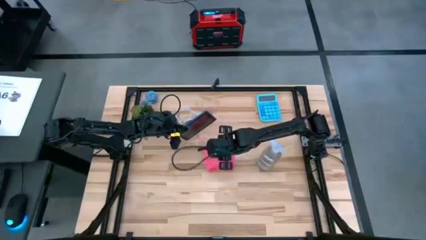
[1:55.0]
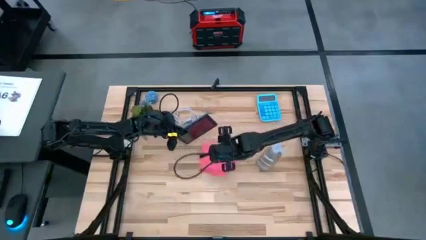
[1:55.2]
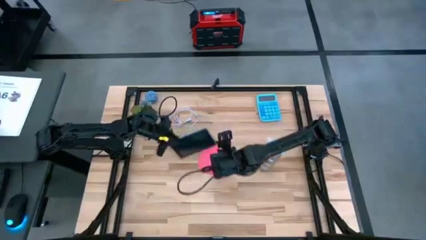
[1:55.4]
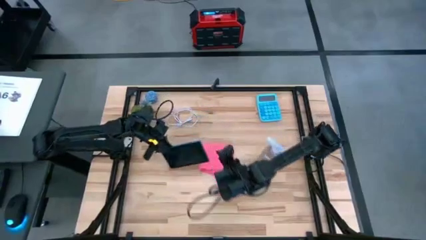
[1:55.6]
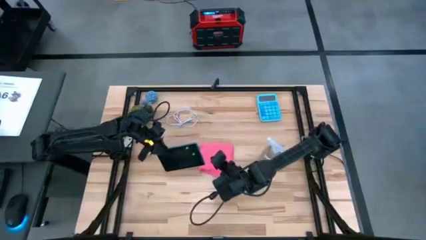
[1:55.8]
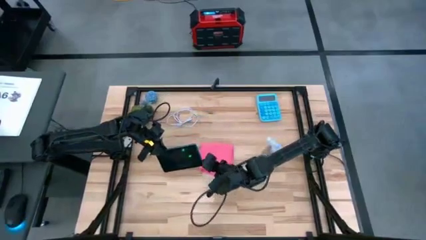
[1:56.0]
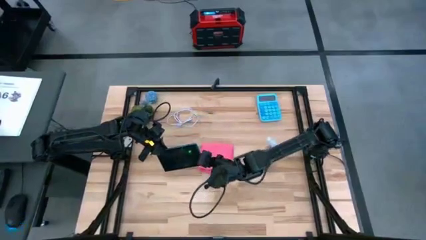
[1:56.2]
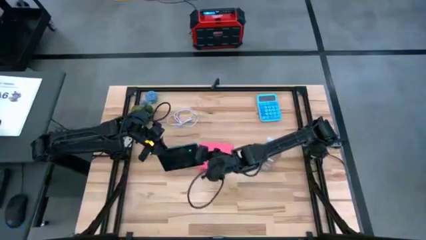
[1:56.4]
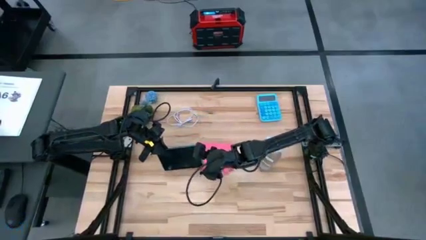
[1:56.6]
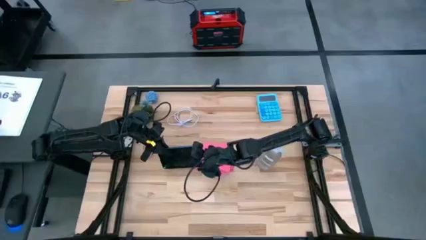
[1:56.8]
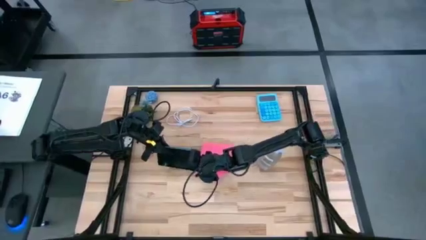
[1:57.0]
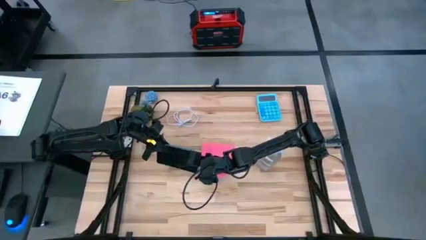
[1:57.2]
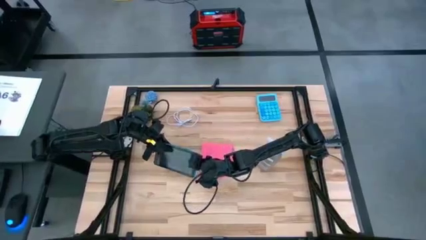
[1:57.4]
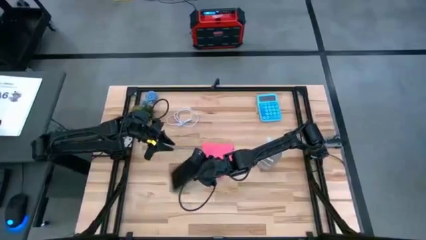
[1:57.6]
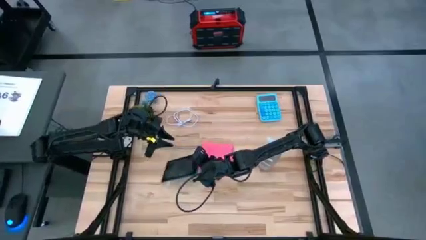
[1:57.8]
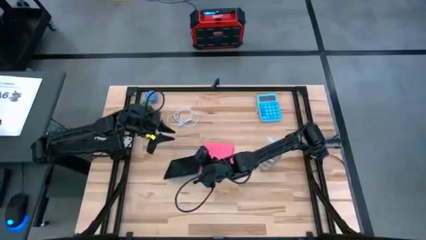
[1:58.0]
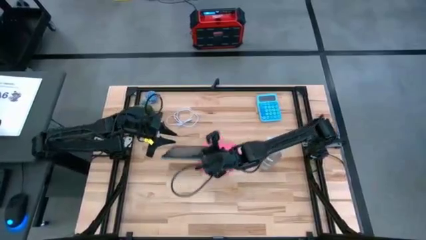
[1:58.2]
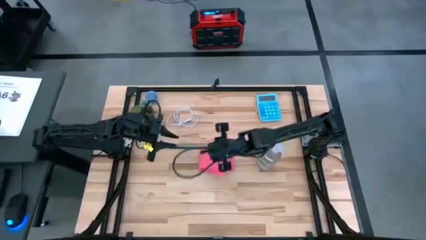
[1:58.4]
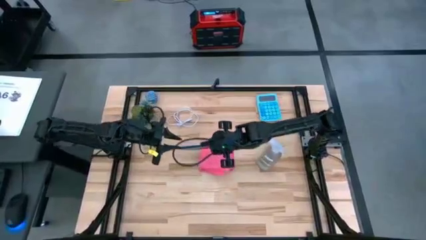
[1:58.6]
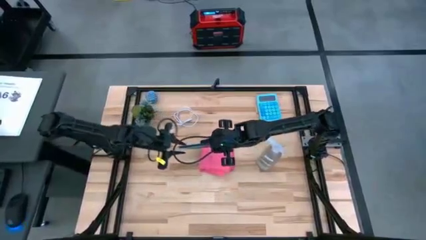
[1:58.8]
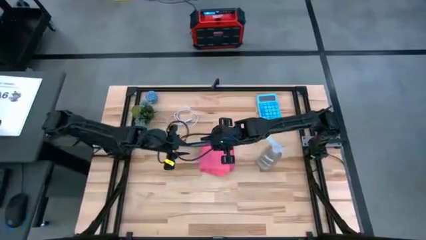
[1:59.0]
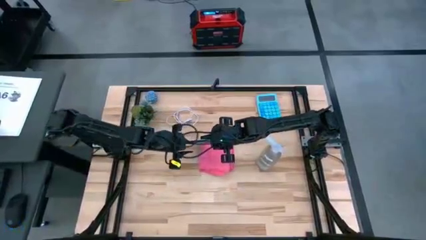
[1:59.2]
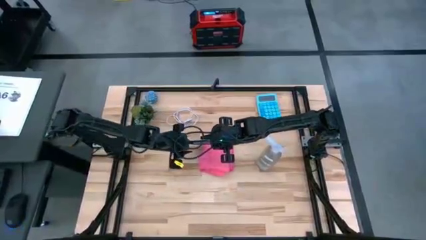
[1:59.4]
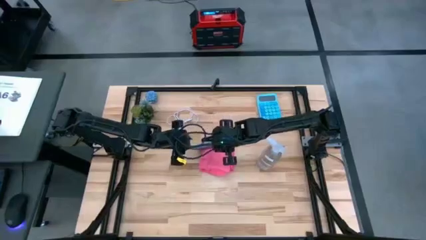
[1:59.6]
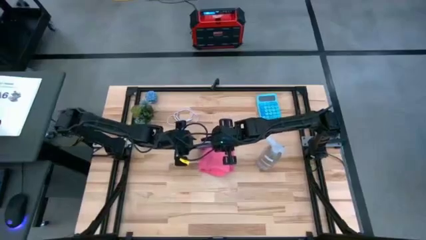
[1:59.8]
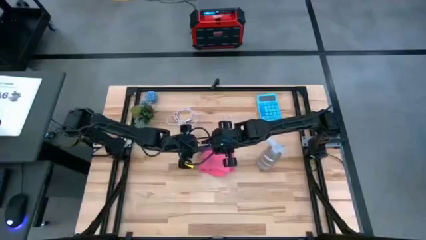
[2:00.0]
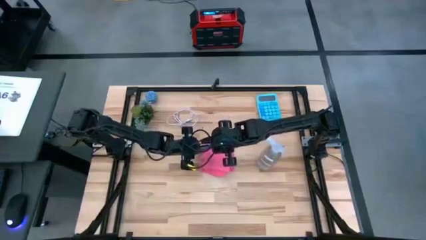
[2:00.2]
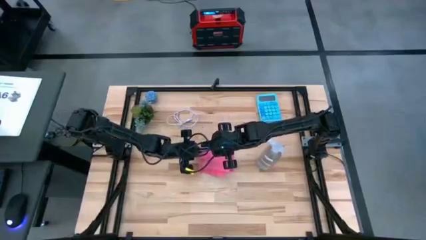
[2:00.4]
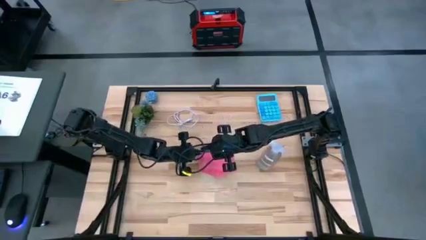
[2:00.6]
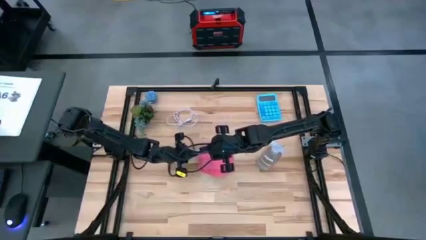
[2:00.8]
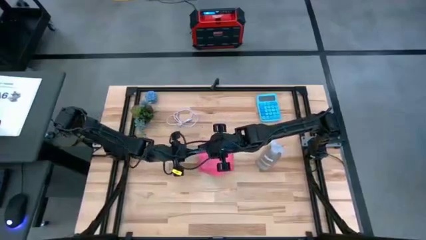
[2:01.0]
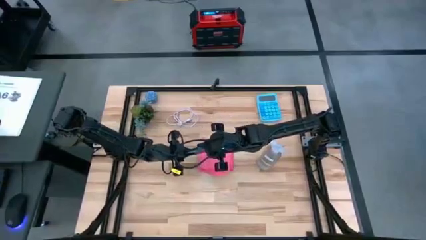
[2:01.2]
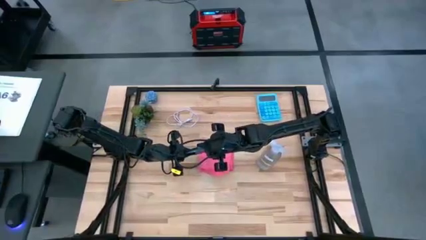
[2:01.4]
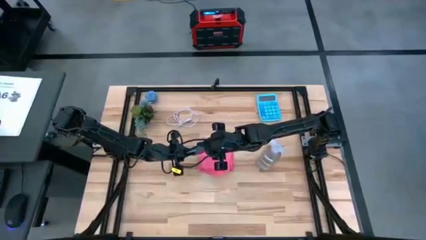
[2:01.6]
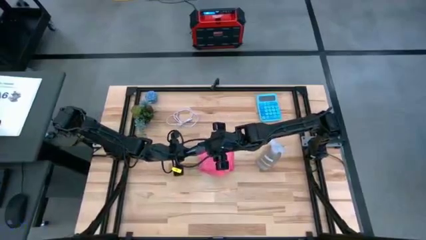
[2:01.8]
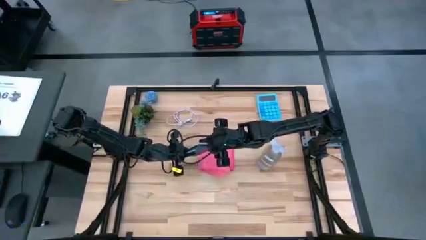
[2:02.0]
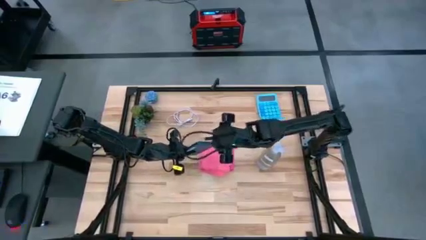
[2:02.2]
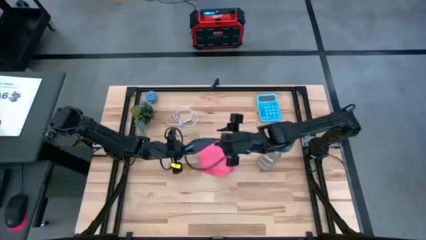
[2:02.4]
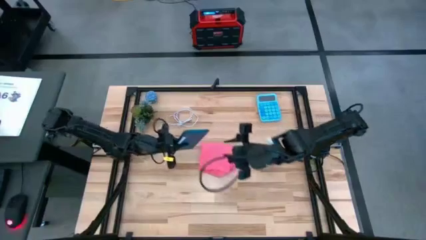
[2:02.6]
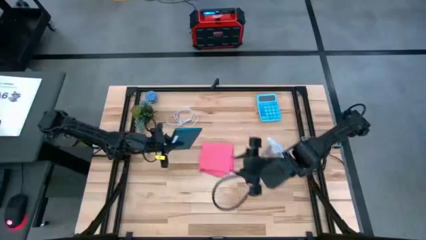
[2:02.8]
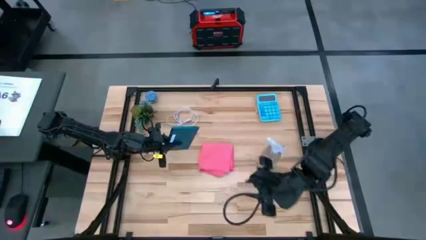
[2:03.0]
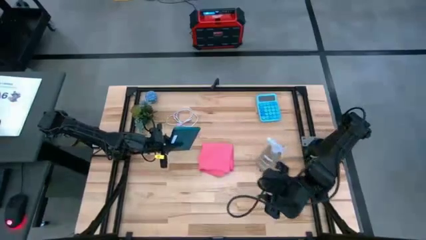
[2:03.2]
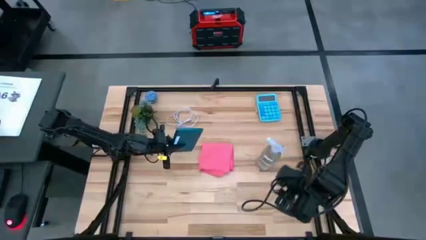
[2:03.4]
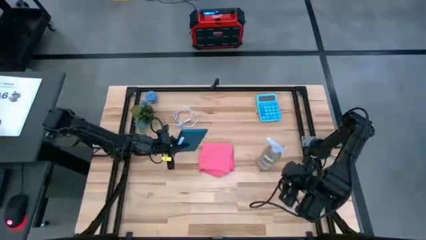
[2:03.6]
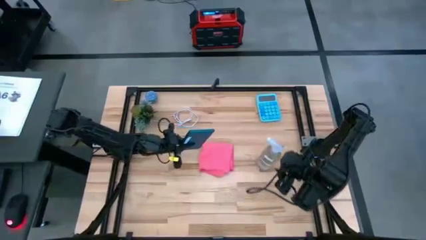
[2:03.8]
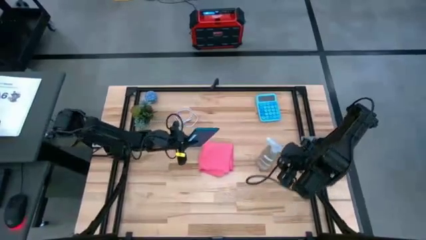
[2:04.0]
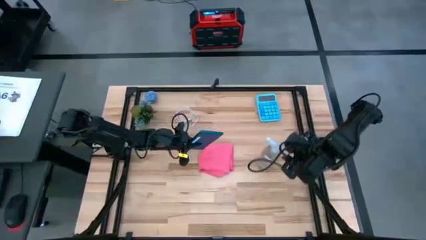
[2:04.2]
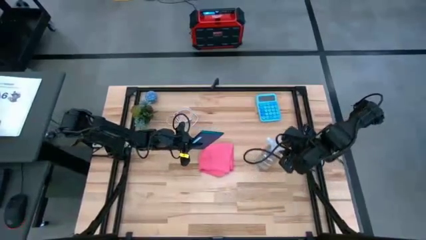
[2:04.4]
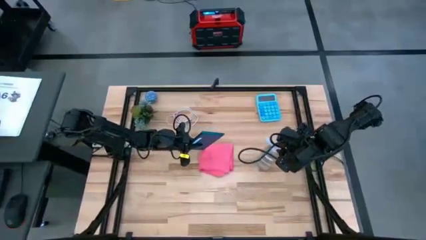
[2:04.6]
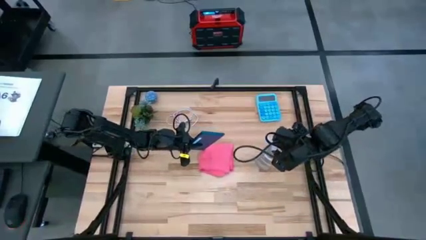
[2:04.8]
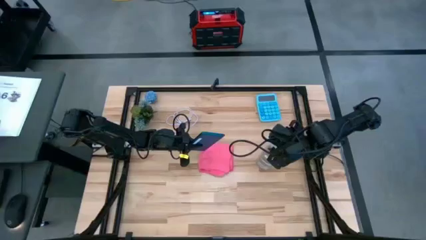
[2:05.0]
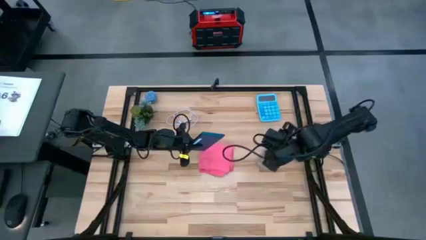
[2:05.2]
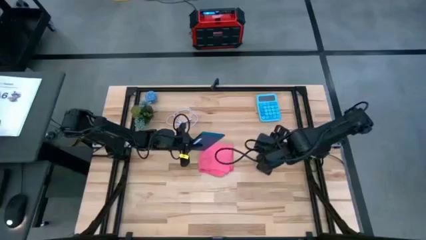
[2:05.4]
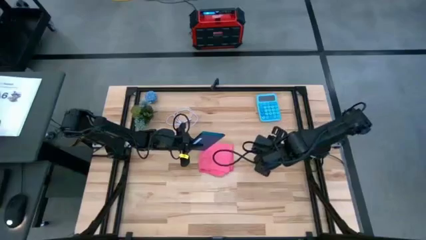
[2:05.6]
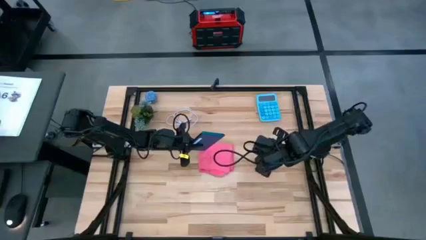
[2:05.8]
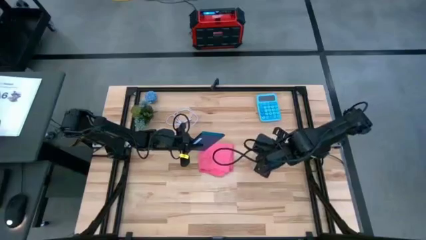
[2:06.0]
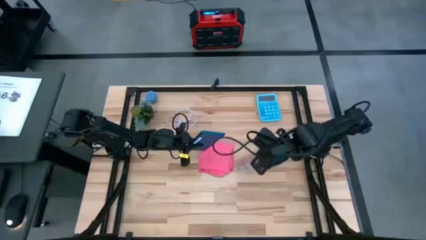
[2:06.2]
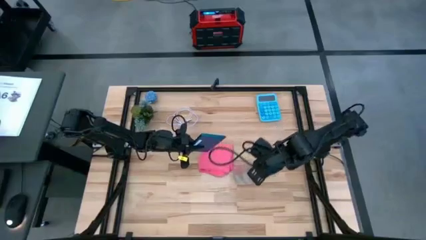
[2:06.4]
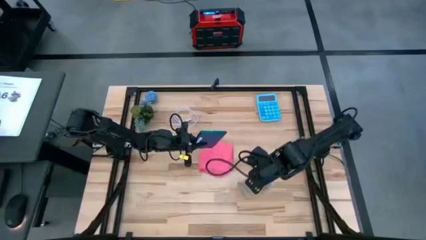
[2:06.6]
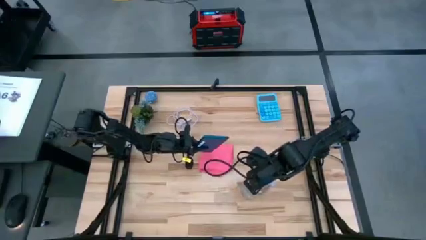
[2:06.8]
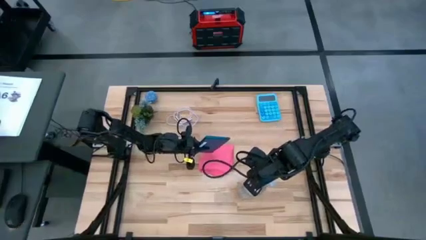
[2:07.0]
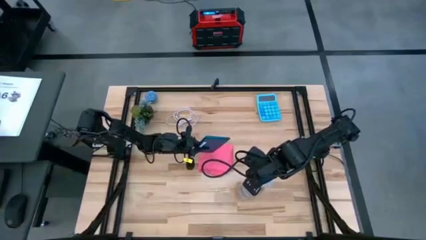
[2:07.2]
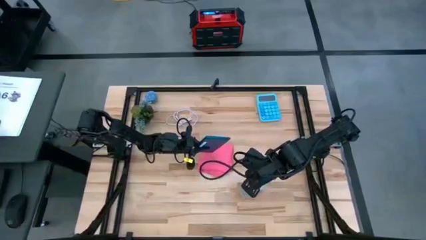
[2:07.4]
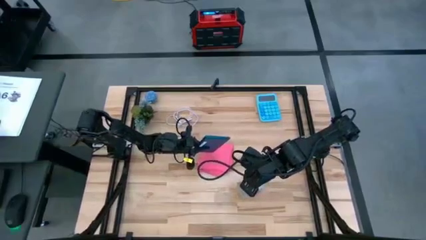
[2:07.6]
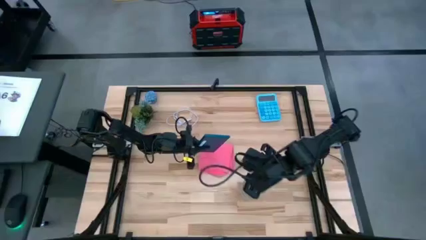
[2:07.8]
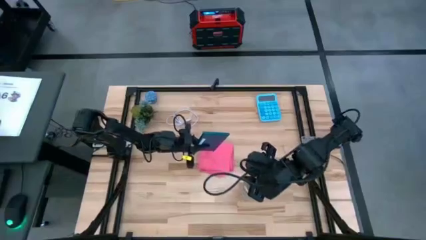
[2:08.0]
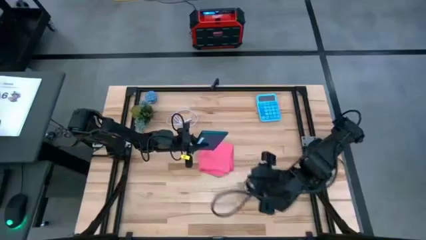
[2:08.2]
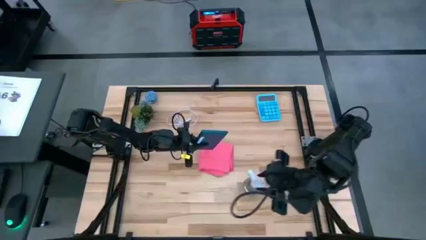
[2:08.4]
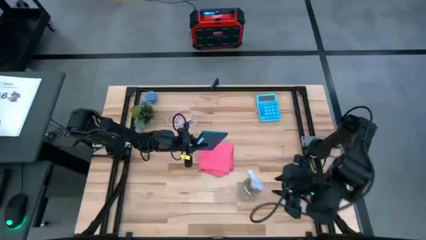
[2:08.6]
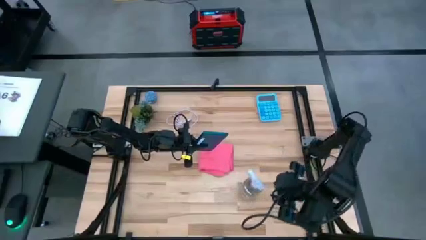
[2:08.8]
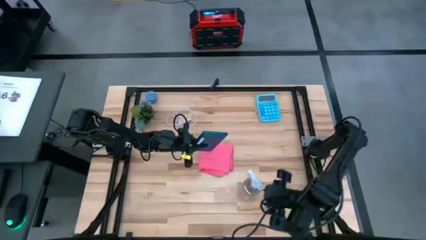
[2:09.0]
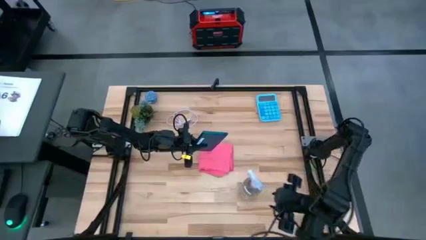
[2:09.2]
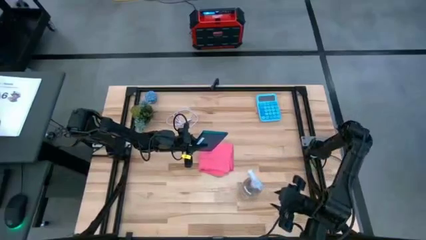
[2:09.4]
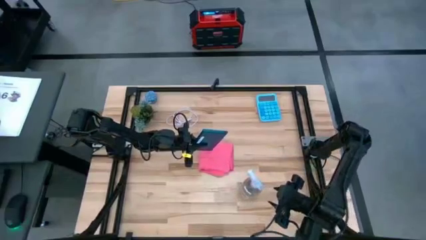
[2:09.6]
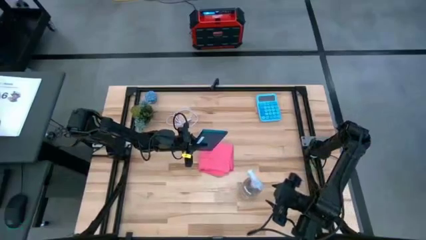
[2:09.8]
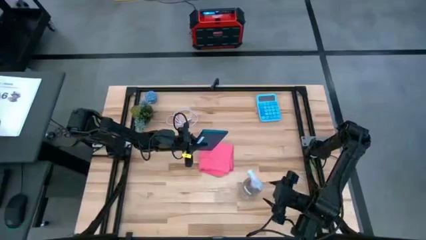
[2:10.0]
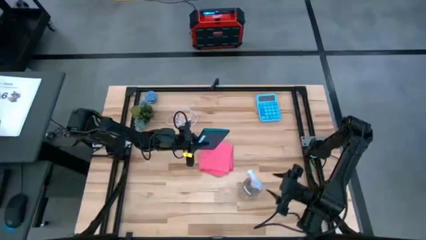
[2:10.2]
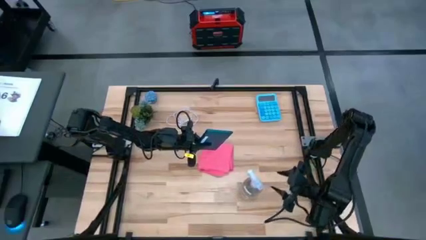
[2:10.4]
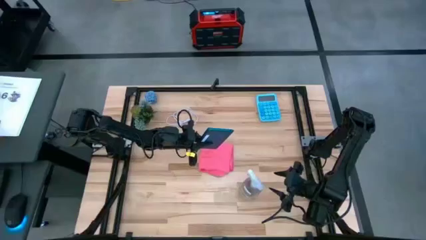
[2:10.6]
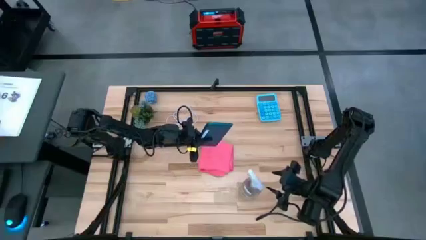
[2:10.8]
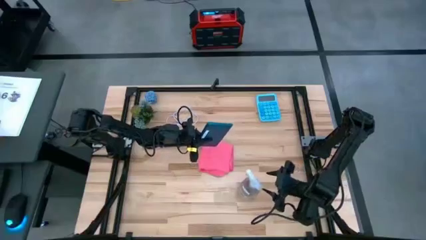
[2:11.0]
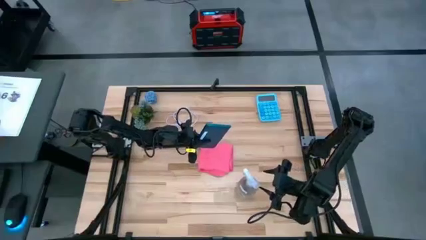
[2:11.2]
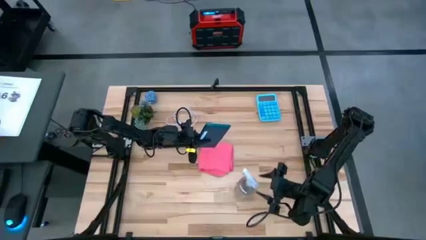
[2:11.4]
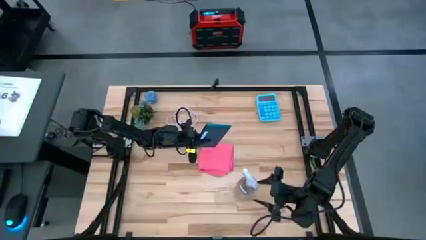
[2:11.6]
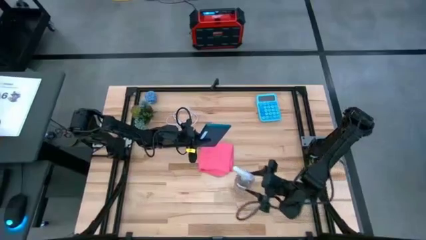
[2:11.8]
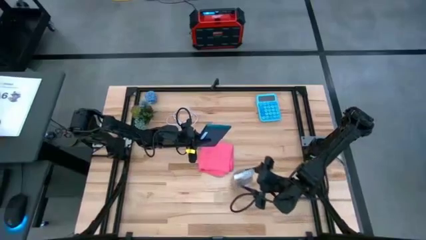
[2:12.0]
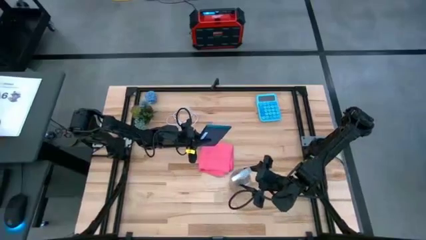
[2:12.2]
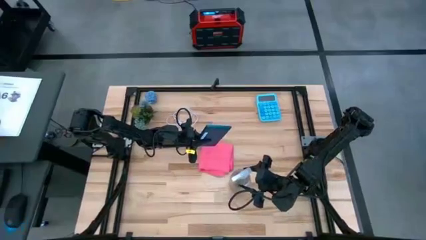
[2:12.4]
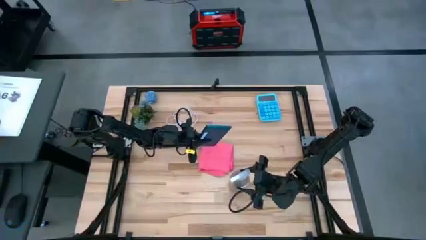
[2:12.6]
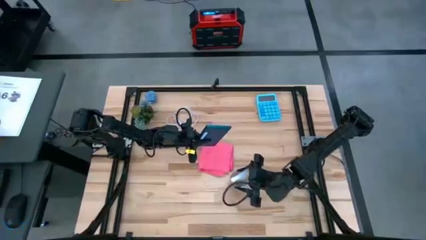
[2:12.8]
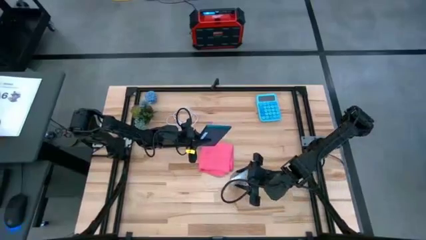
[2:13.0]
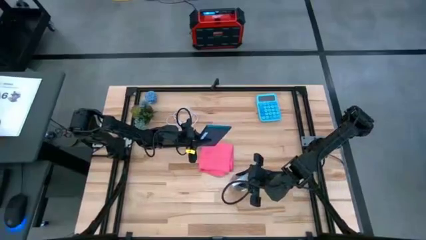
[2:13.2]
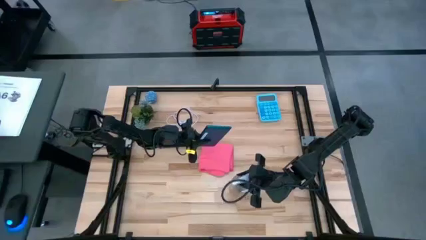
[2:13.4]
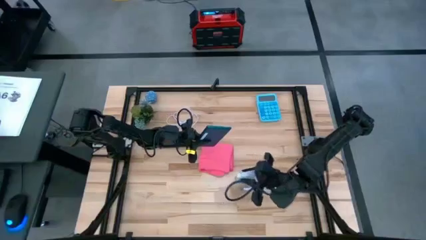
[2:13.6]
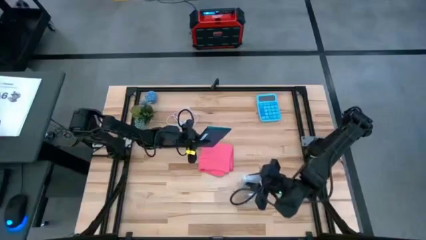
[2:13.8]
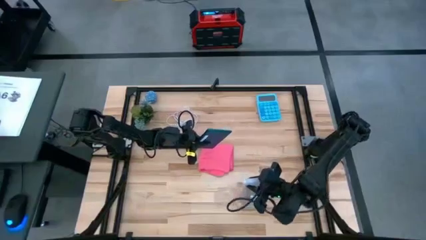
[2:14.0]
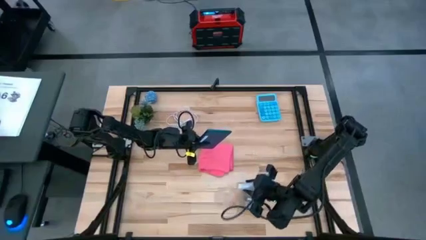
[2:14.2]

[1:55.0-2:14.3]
Task: Apply microfiber cloth
Spray the back of the cellphone using the spray bottle
